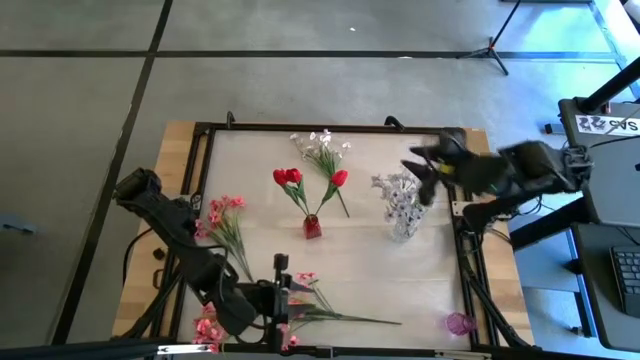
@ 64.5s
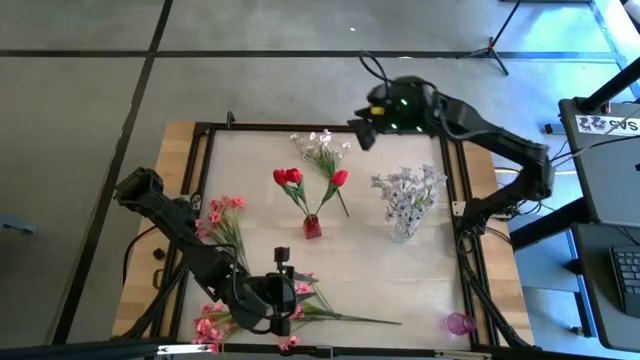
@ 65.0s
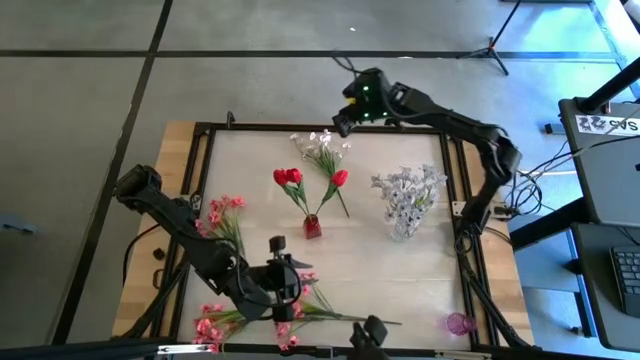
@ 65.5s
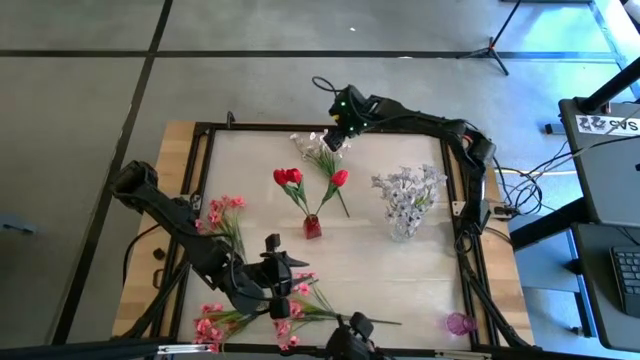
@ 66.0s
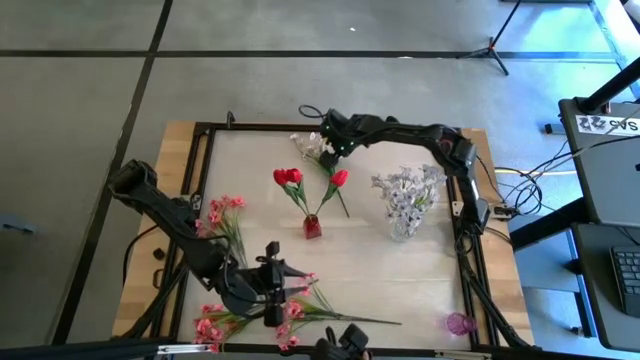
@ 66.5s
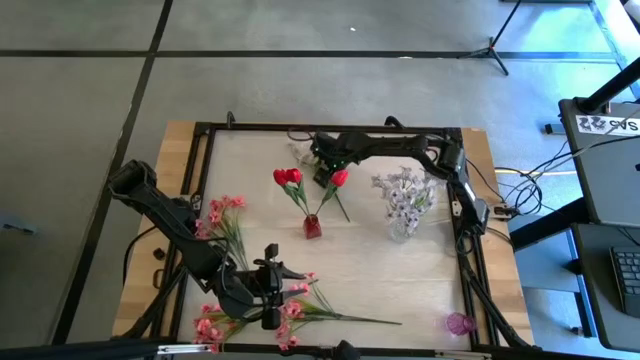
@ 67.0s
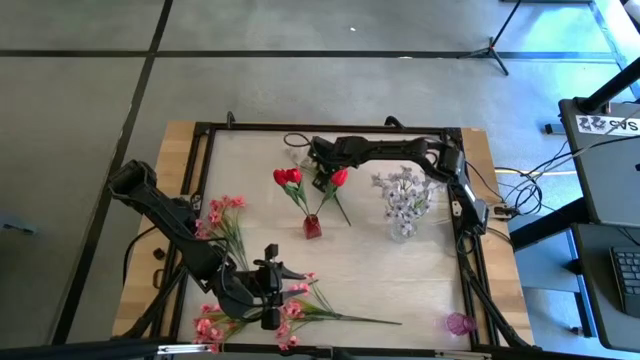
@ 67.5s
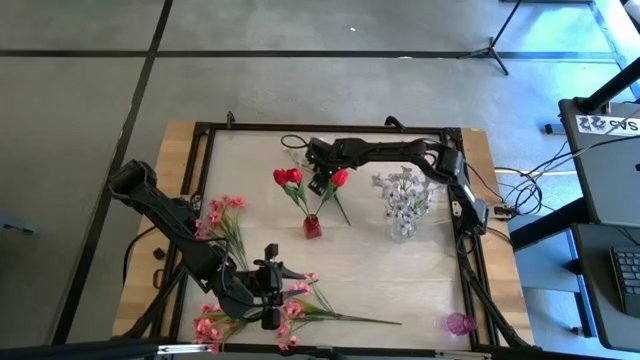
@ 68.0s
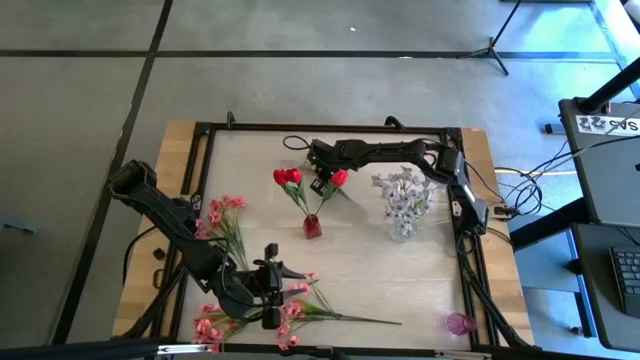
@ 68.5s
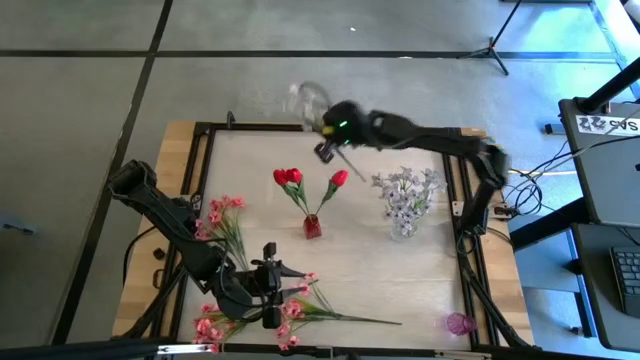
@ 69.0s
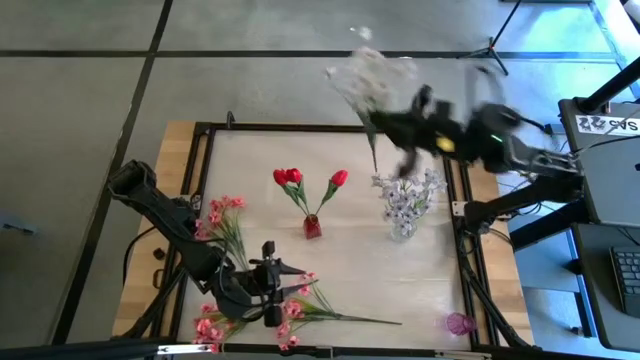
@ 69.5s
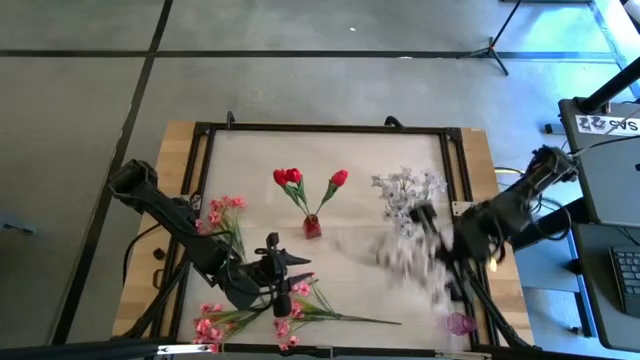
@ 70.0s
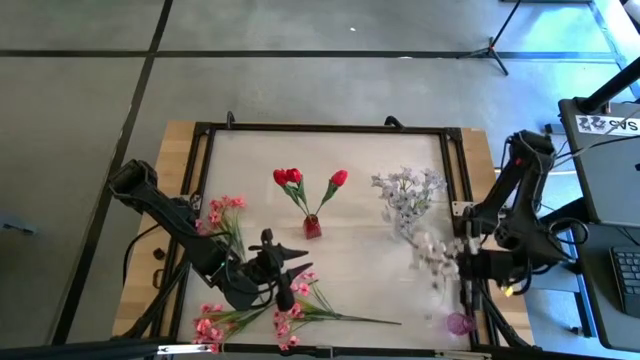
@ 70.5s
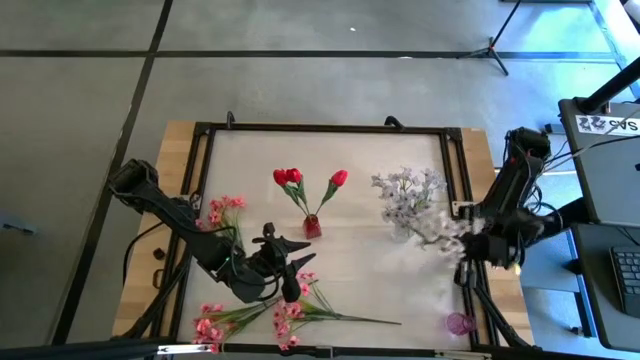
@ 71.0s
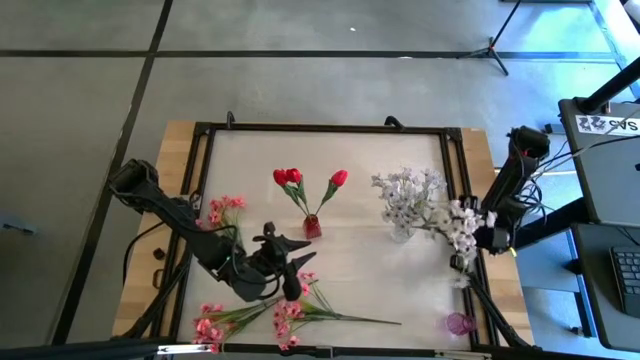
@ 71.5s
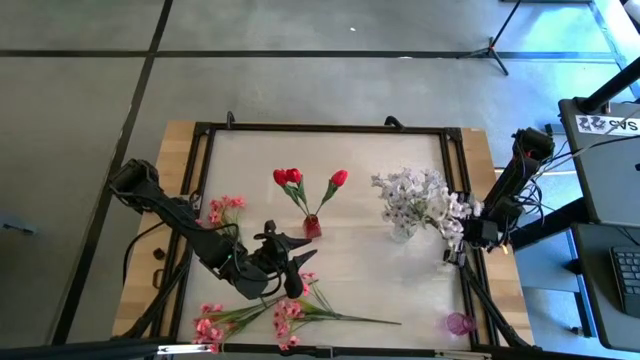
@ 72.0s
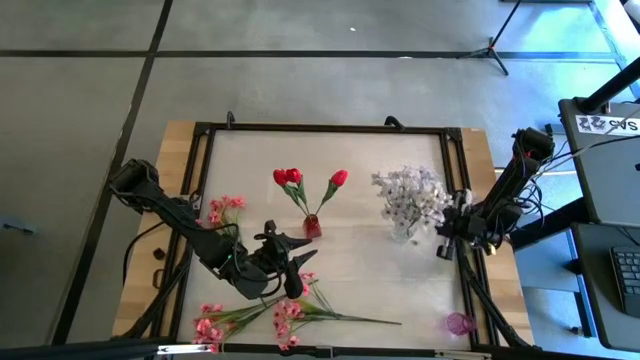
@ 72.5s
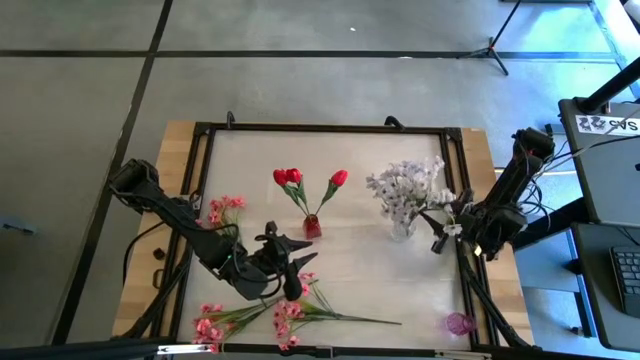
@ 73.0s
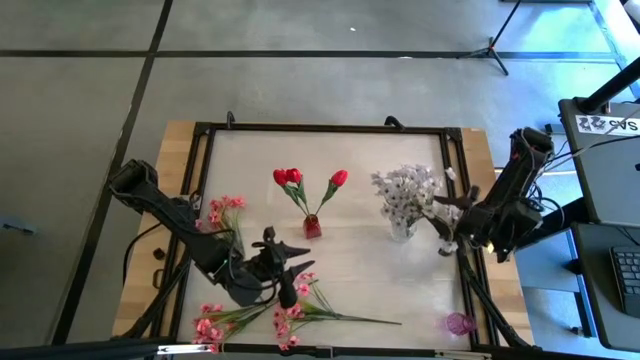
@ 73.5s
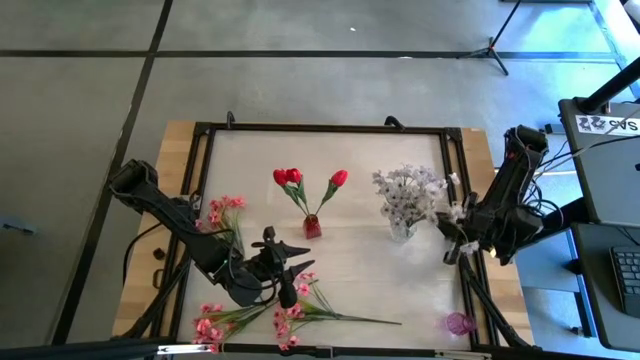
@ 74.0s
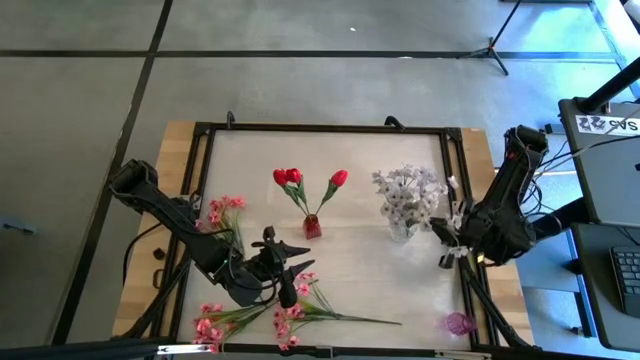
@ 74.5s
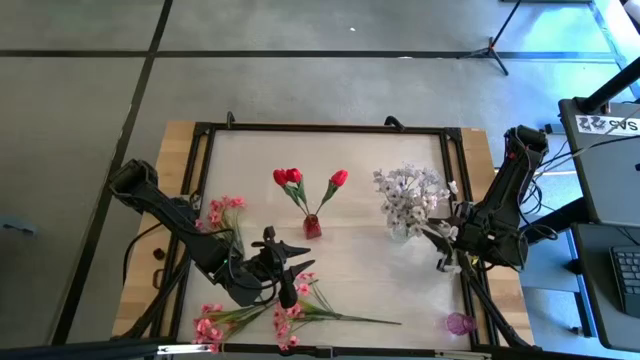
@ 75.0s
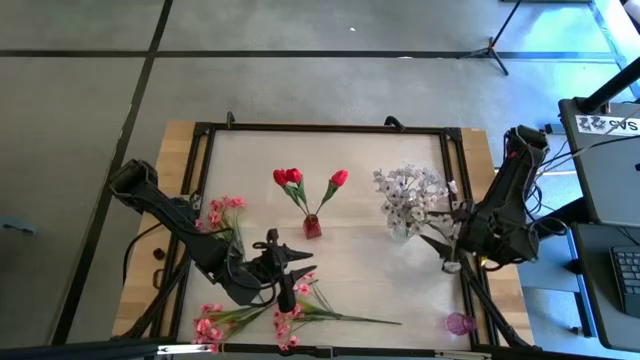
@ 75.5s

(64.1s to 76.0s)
Task: Sort flowers into vase by color
Put the white flowers into the transparent vase

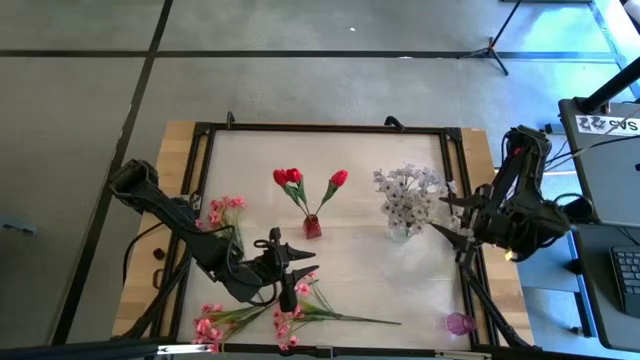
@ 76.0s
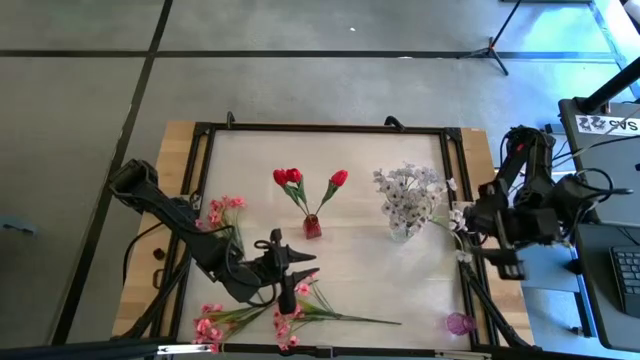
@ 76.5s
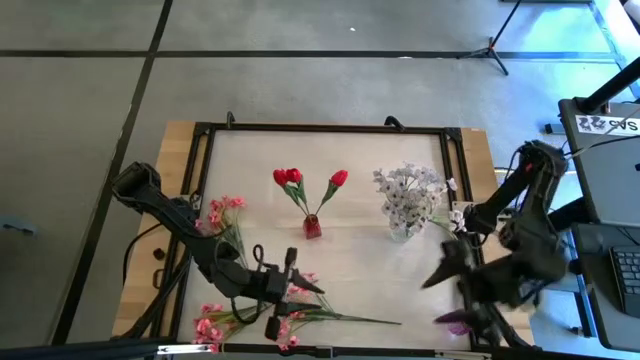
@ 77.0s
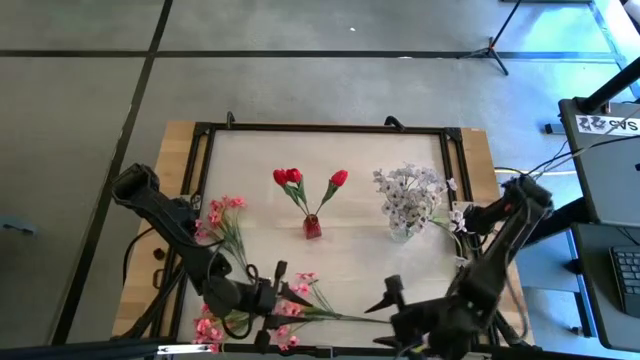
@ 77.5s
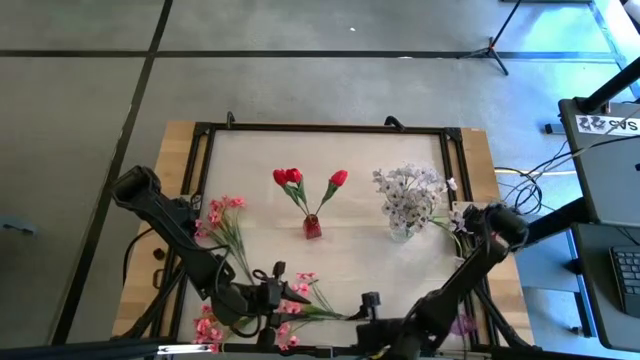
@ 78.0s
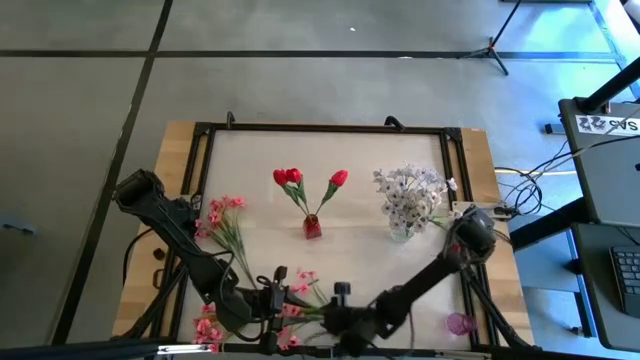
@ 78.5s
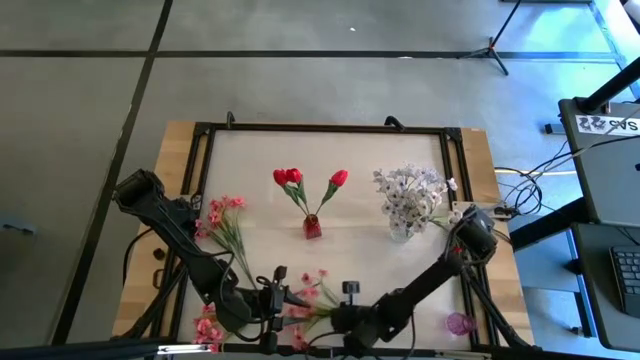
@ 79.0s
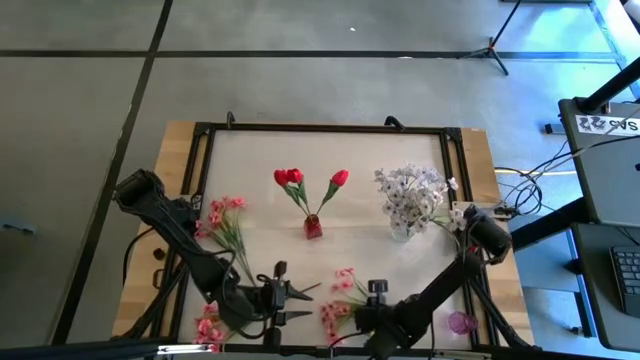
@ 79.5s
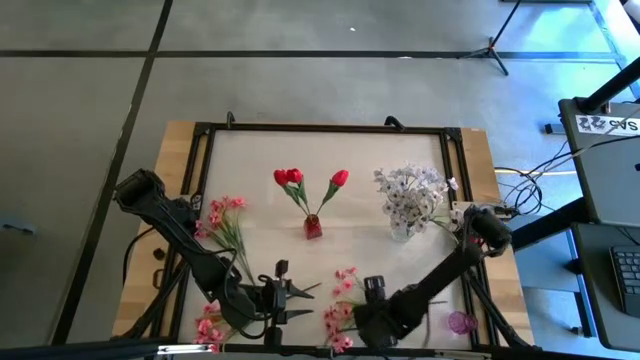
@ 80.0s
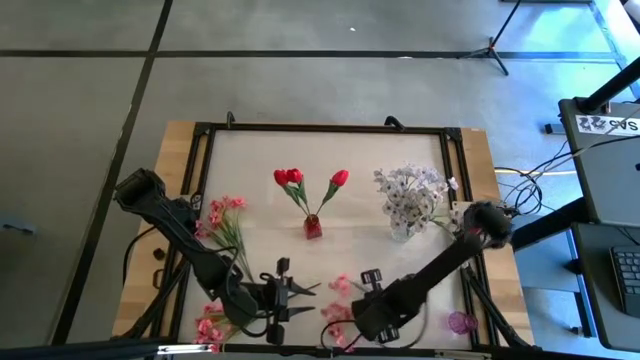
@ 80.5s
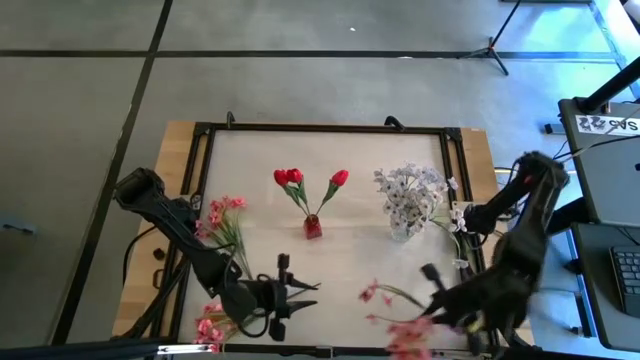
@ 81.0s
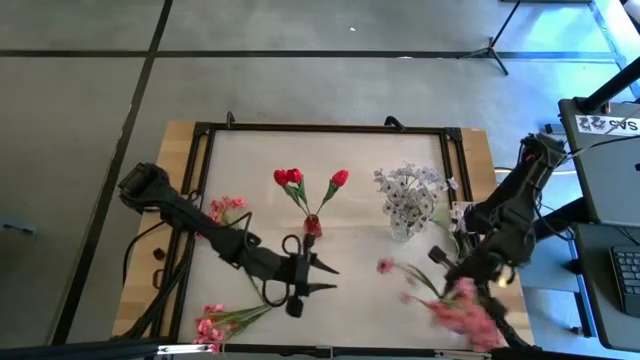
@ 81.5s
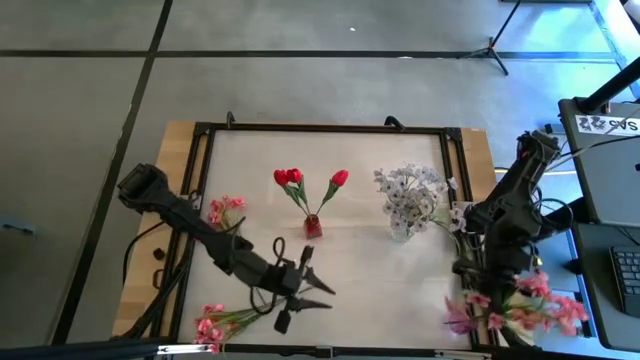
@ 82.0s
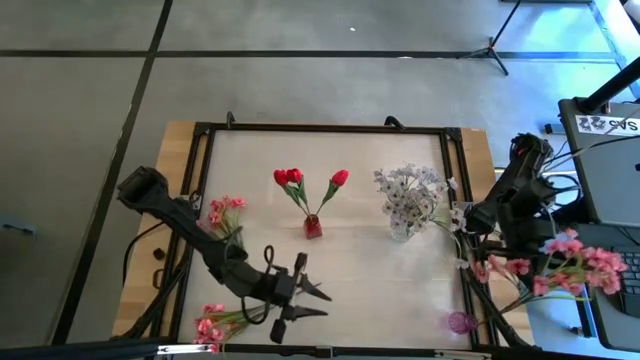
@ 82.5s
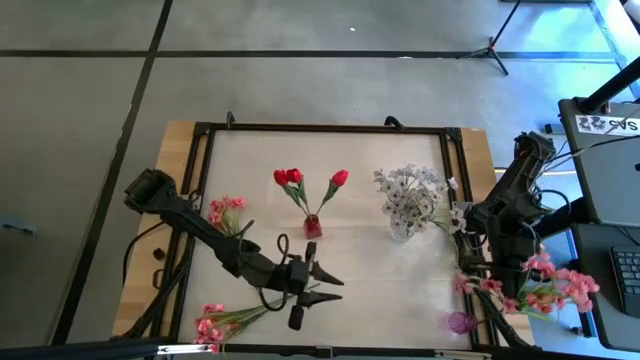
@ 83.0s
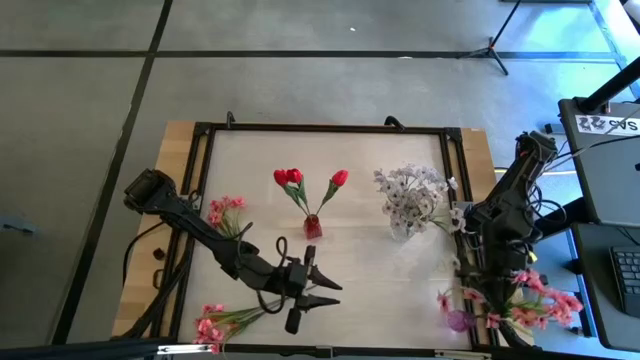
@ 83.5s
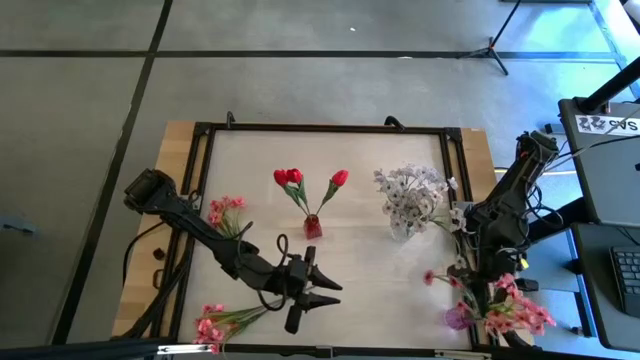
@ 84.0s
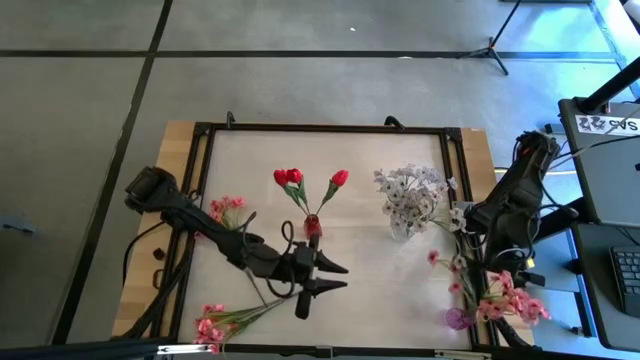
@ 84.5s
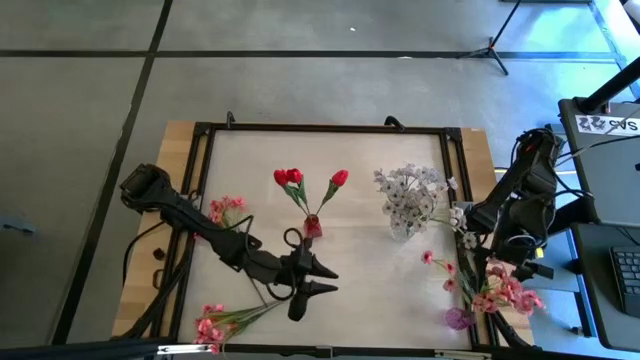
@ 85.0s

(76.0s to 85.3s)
Put the bottom left pink flowers into the pink vase
